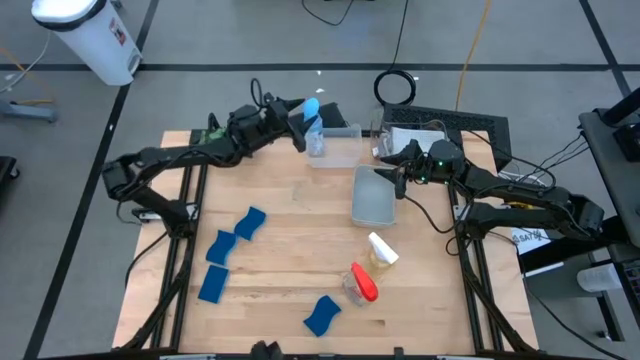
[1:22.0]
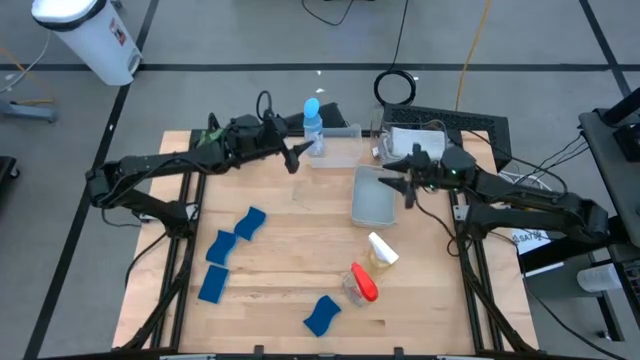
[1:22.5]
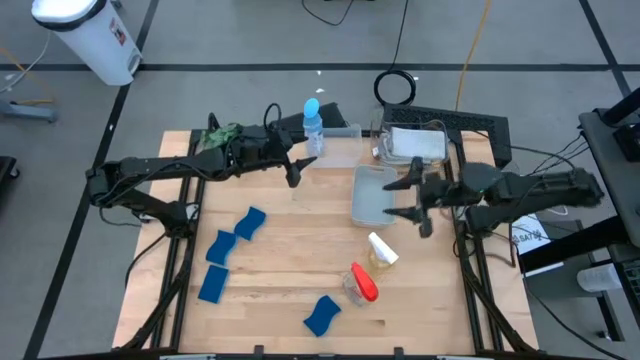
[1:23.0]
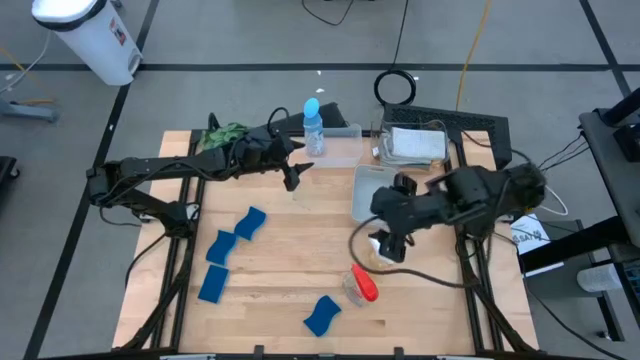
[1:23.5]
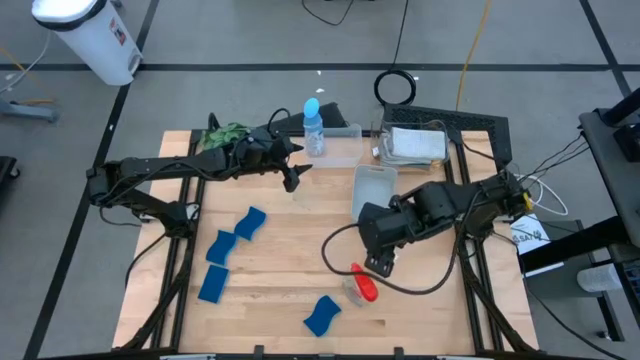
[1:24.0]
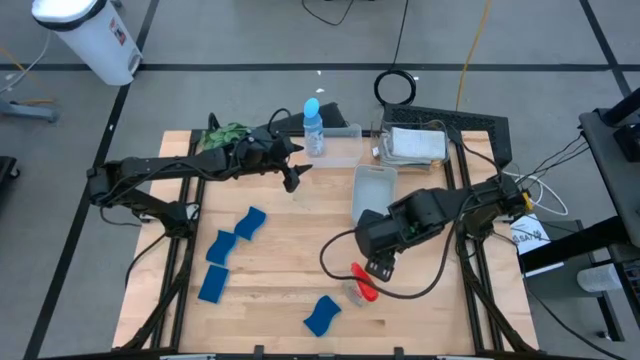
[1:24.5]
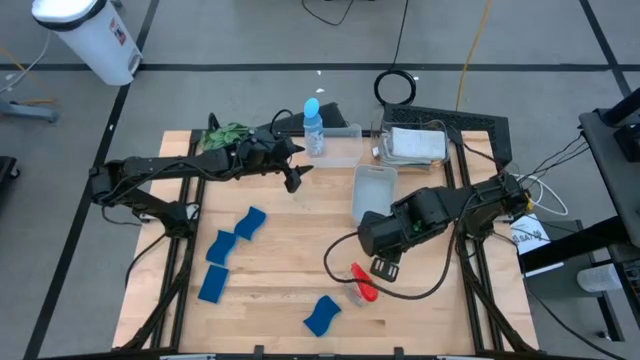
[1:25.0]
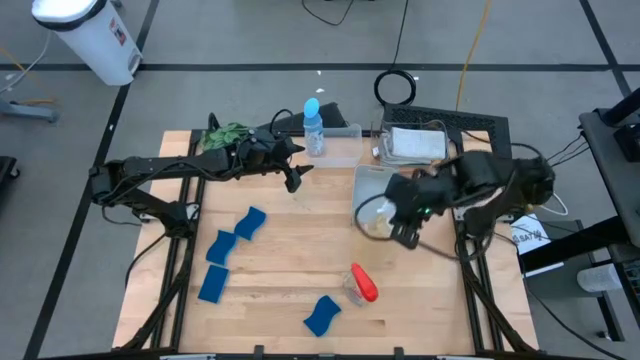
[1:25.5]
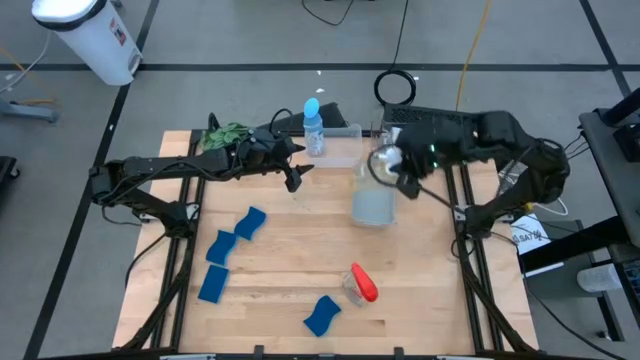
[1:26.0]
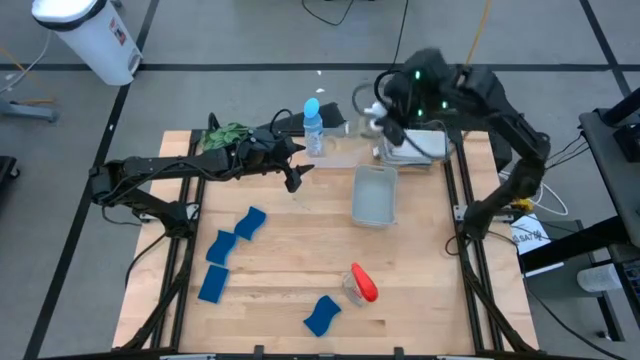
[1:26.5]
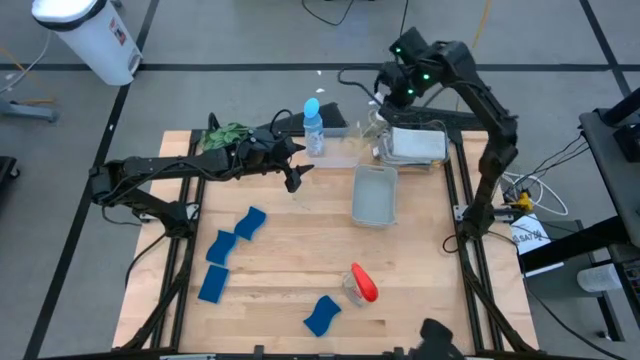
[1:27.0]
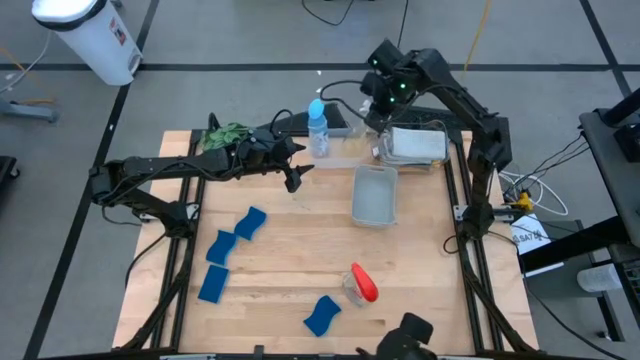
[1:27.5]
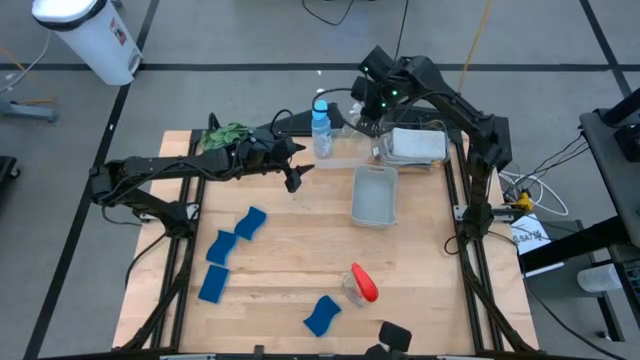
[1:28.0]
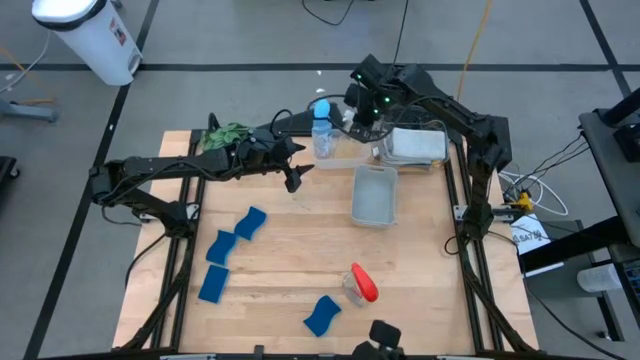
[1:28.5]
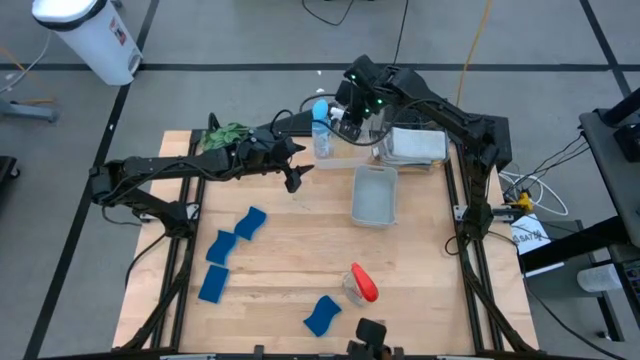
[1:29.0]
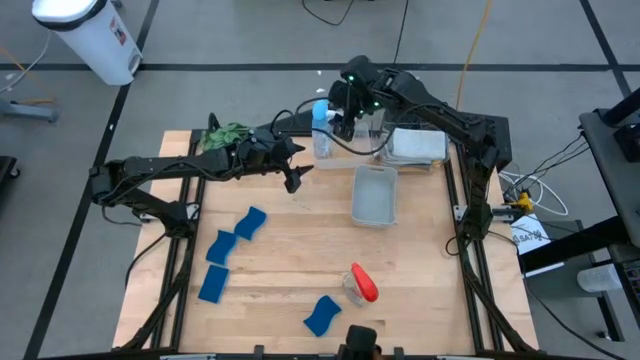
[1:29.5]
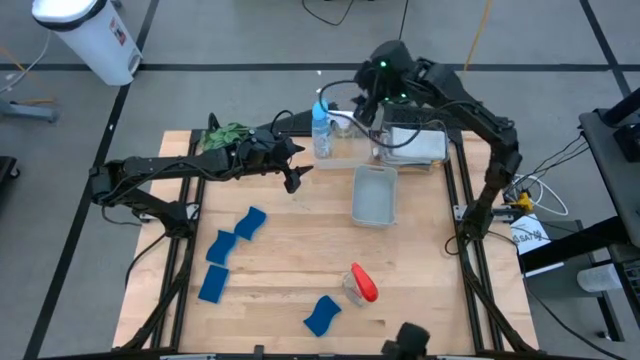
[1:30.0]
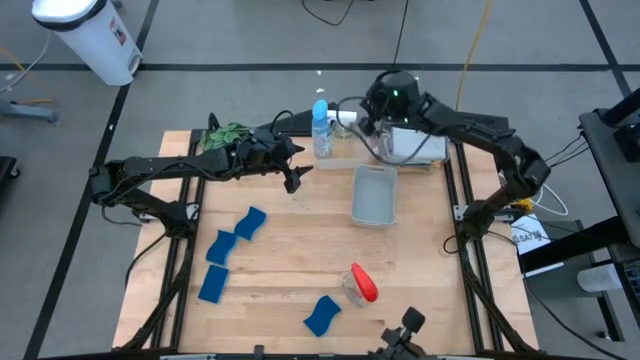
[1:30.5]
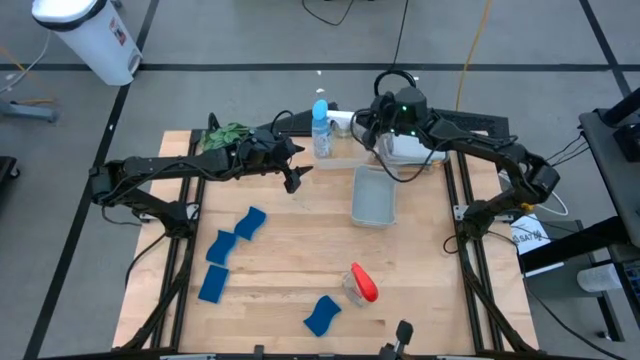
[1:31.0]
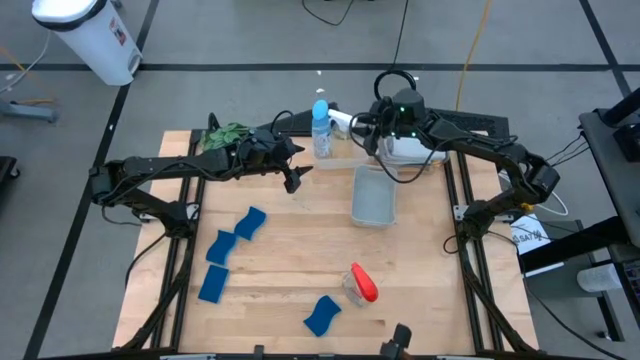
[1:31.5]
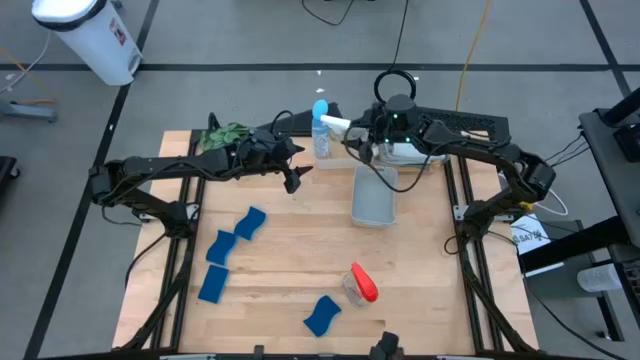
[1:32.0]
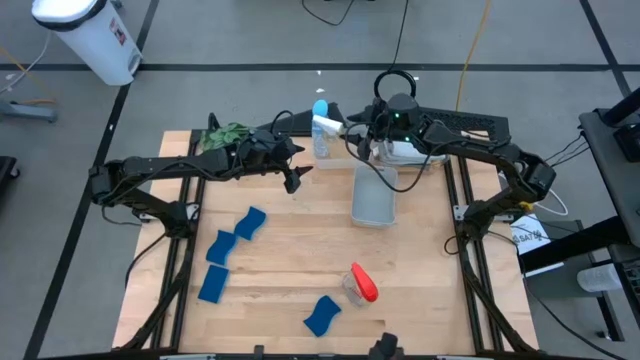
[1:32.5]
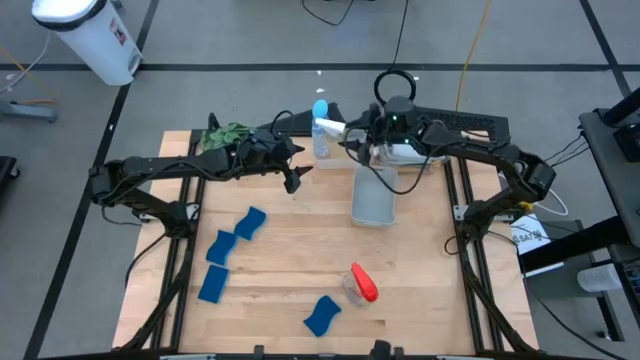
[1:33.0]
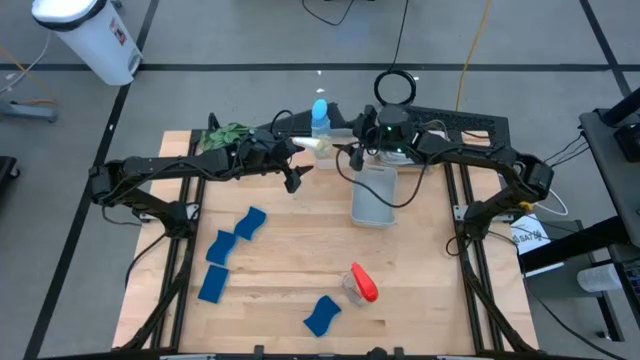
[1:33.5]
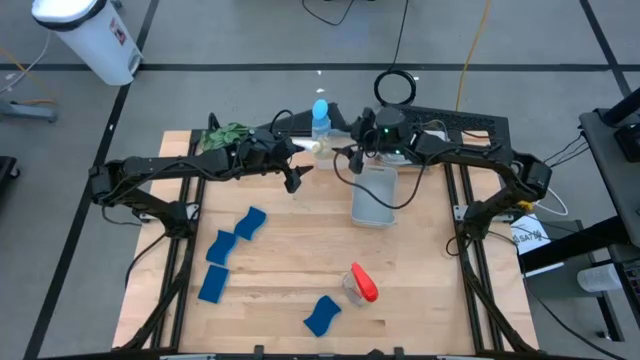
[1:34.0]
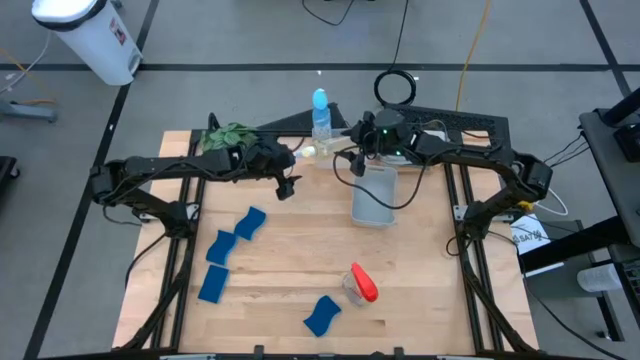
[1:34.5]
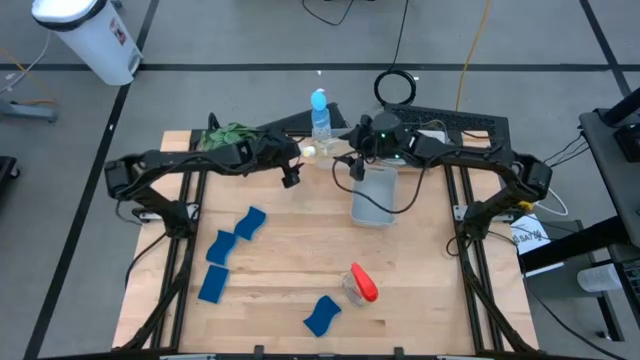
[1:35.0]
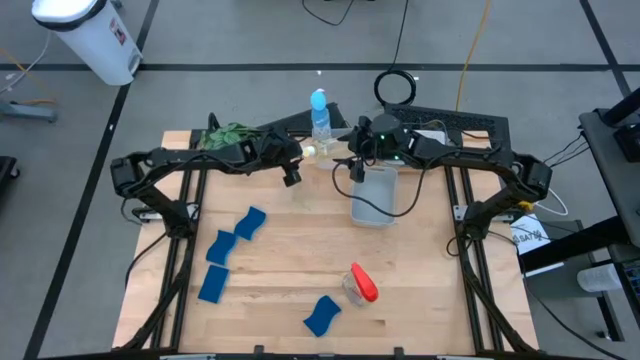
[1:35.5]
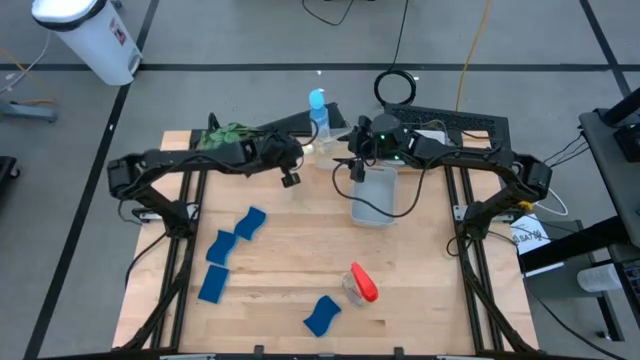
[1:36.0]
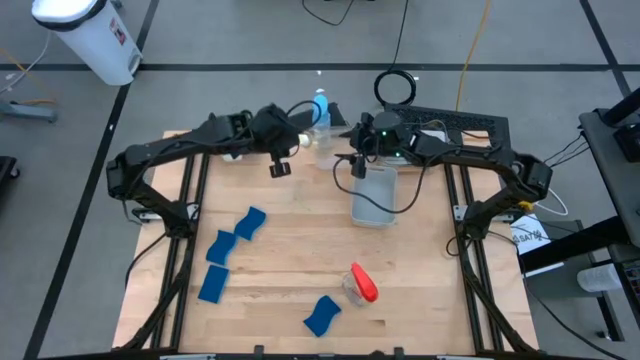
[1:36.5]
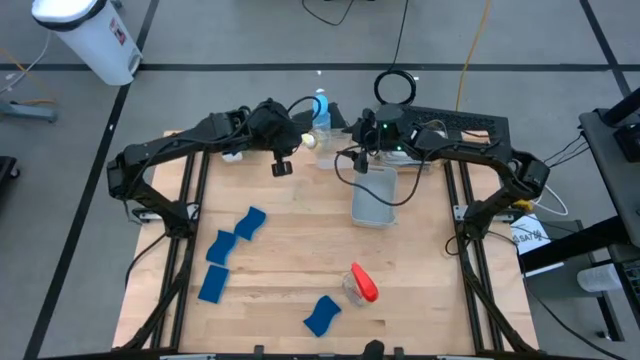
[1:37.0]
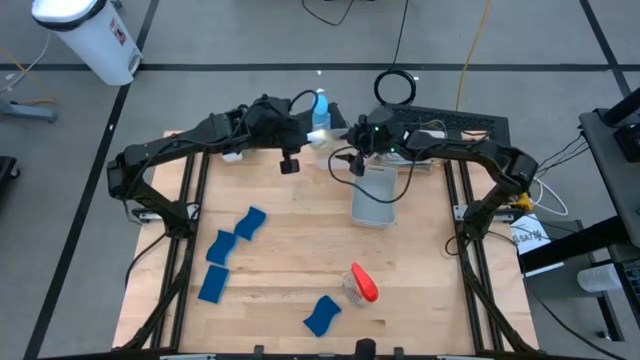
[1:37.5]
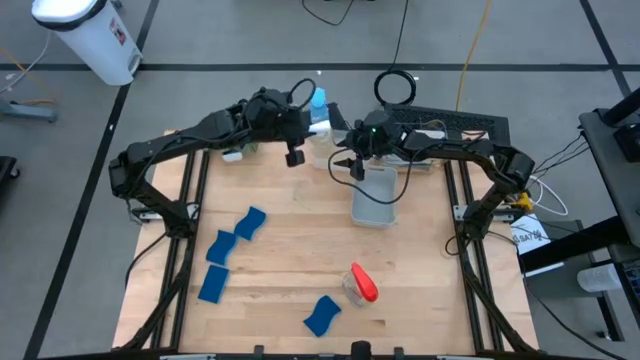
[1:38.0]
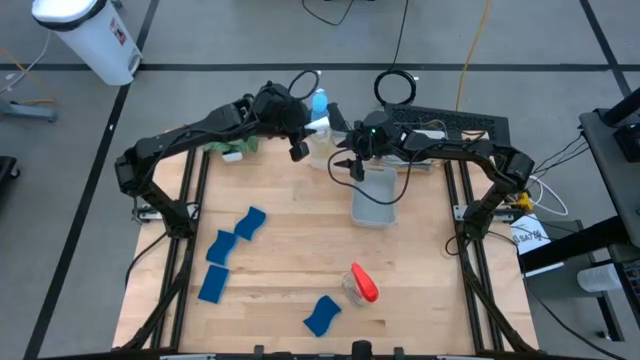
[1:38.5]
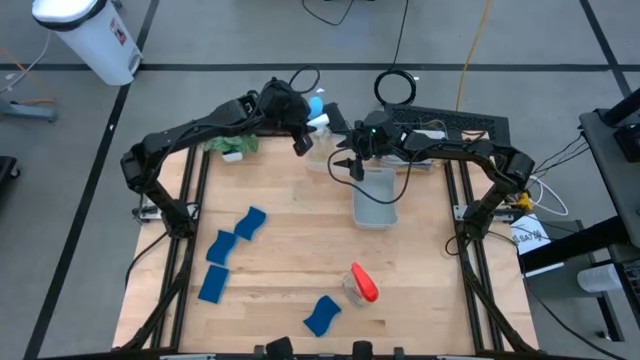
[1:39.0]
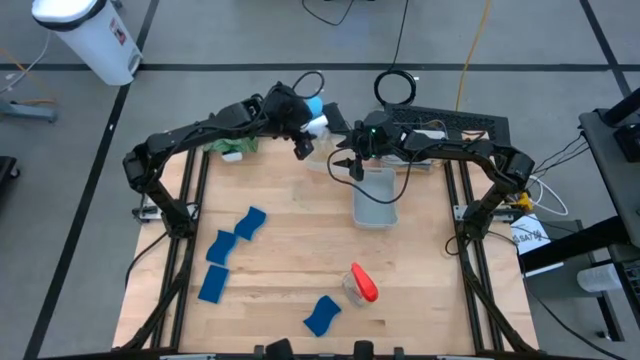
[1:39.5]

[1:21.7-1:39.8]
Task: Pick & Place Kitchen Items
Put the yellow spray bottle into the white transparent bin
